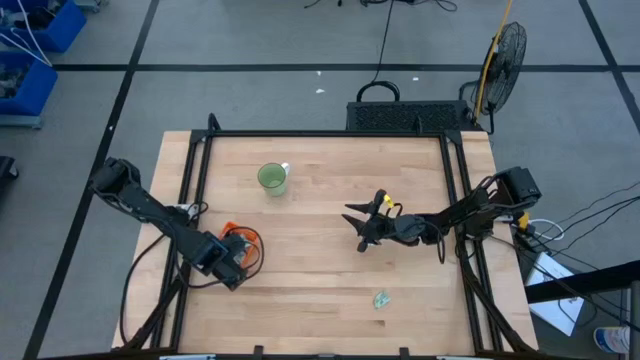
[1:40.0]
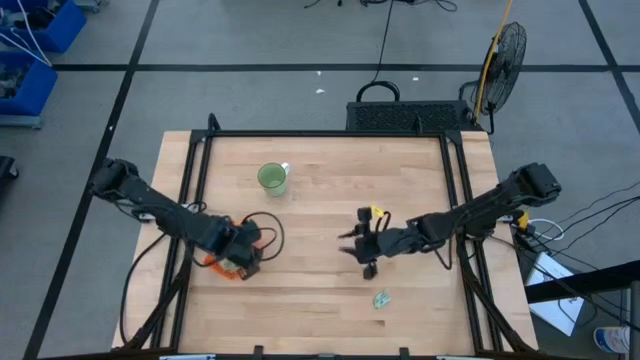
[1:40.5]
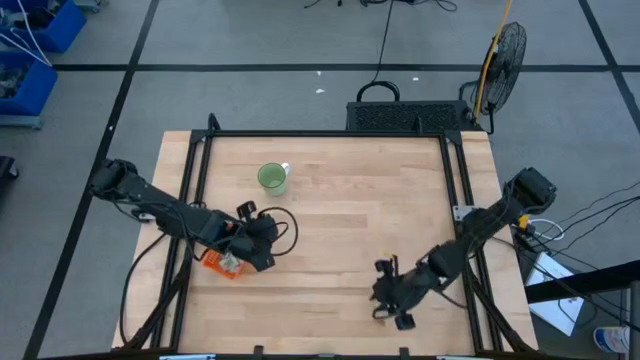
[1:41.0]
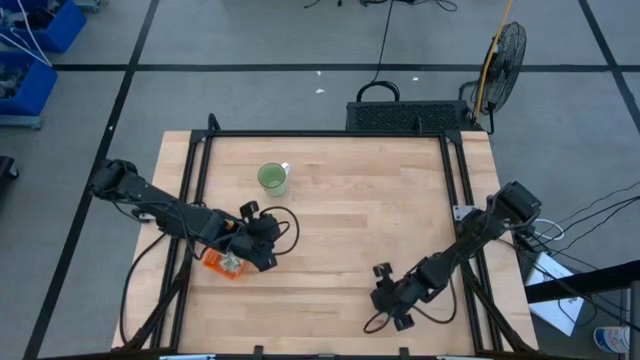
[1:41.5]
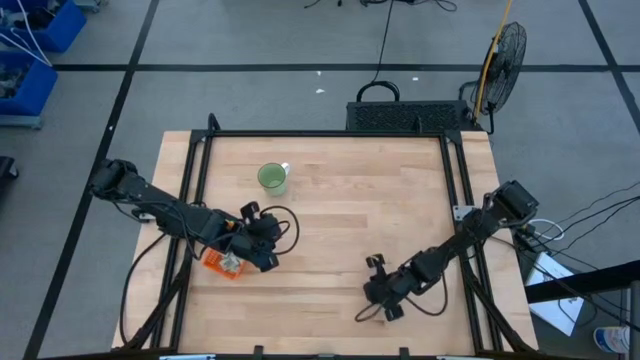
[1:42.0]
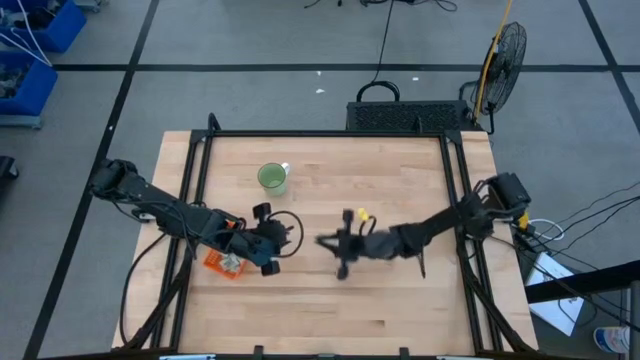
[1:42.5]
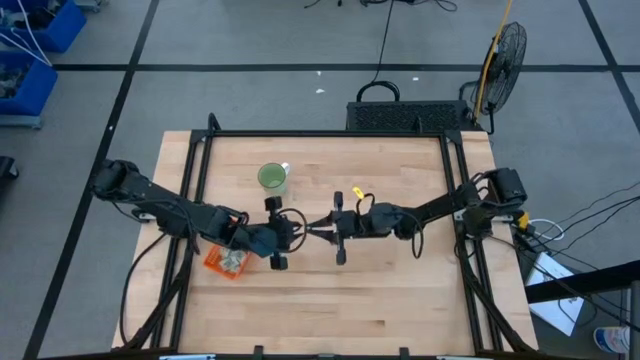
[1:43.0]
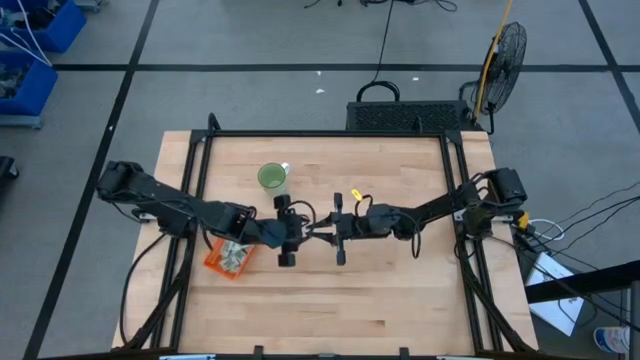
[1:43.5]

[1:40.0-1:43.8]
Task: Pick and place Stevia / Truvia into bins
Put the stevia packet into the orange bin

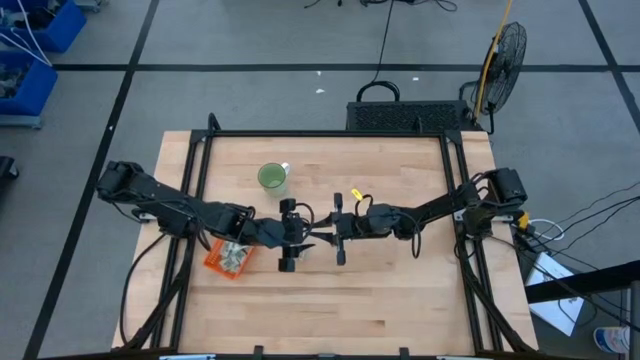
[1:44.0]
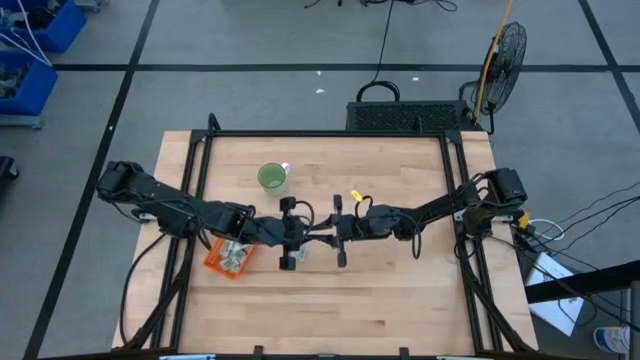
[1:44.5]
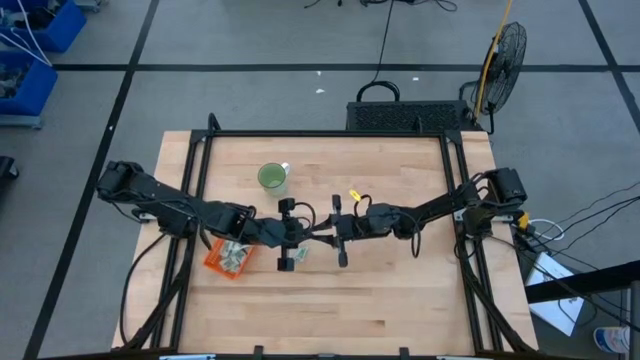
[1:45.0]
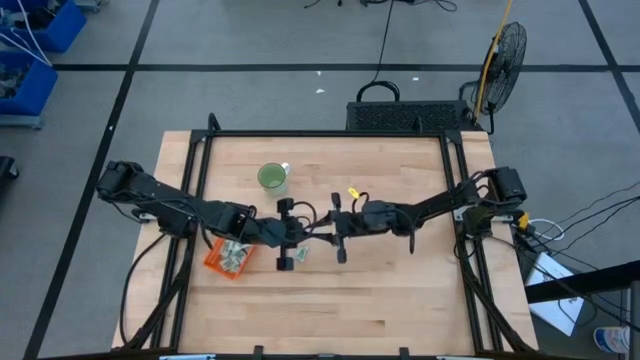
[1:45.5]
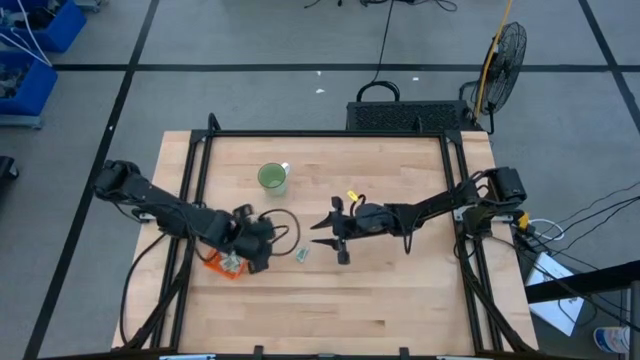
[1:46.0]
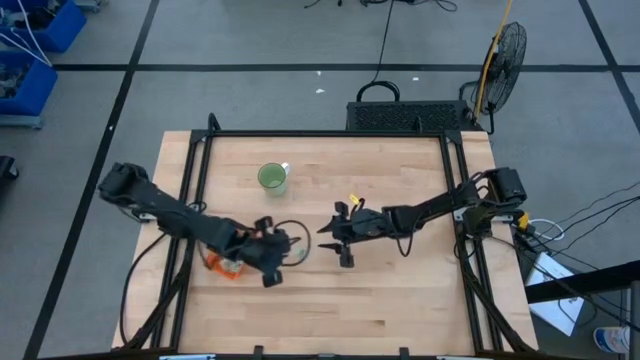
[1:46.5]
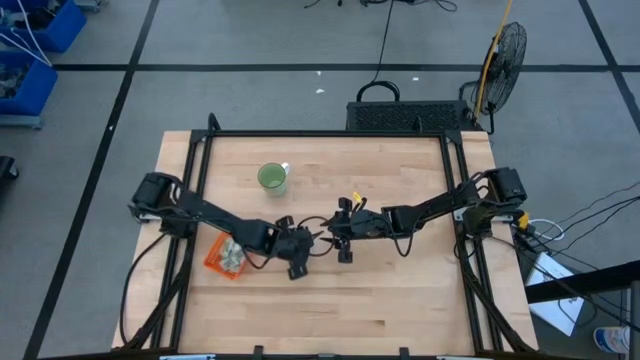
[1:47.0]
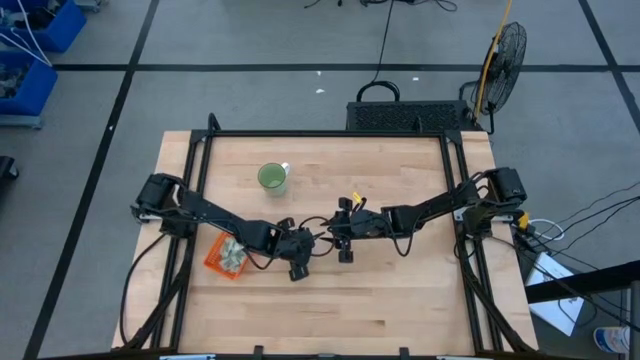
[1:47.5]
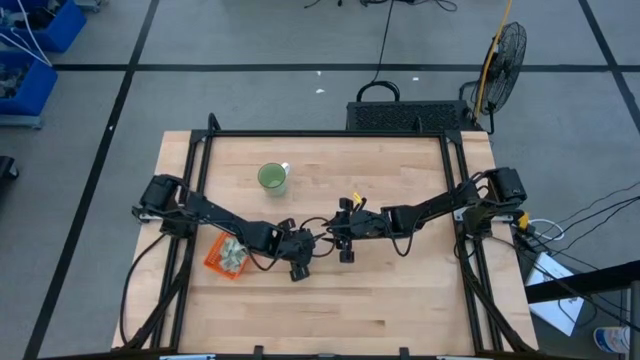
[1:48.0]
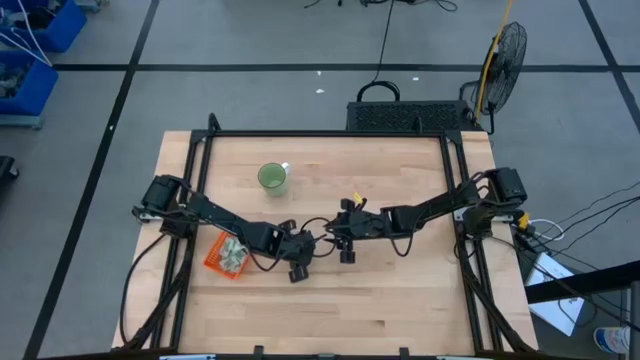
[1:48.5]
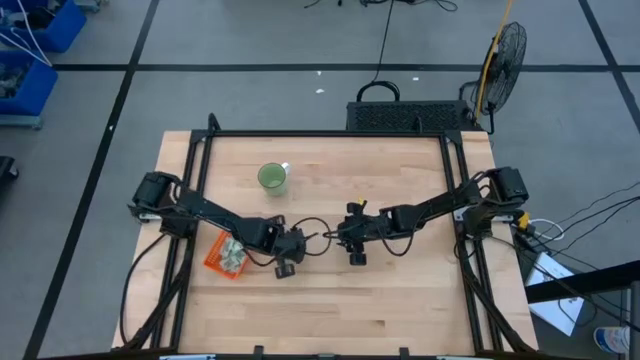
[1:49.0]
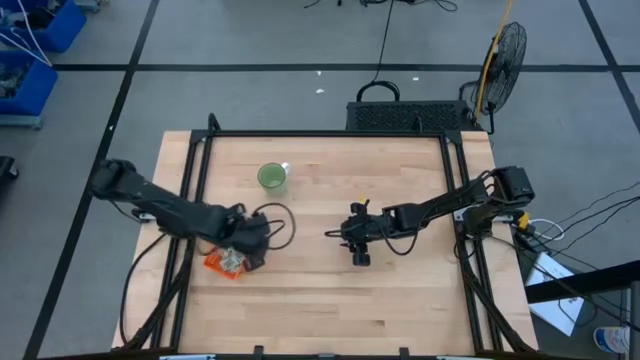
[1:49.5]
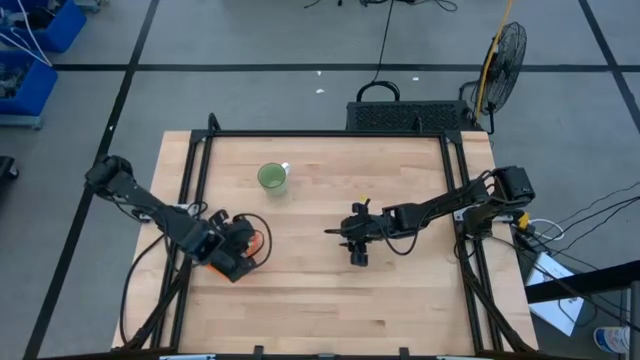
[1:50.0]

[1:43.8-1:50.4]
Put the stevia packet into the orange bin

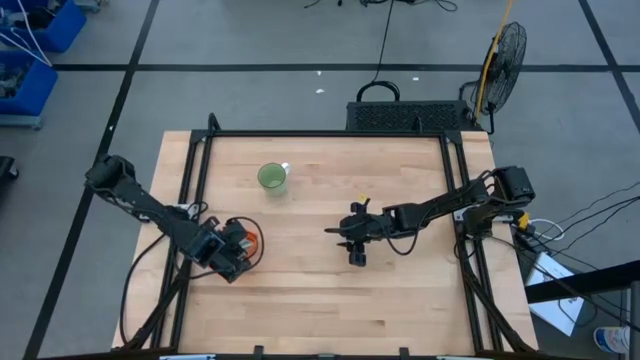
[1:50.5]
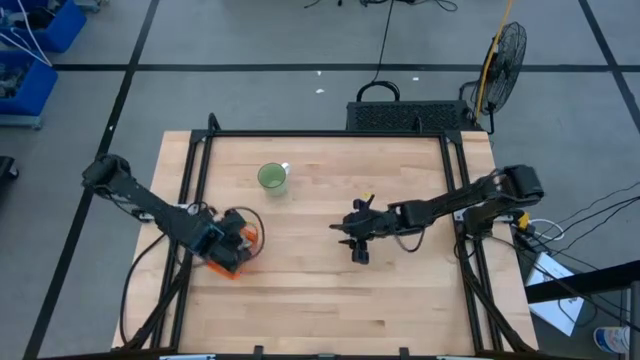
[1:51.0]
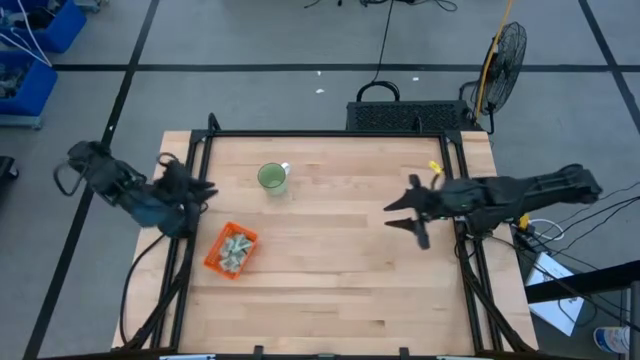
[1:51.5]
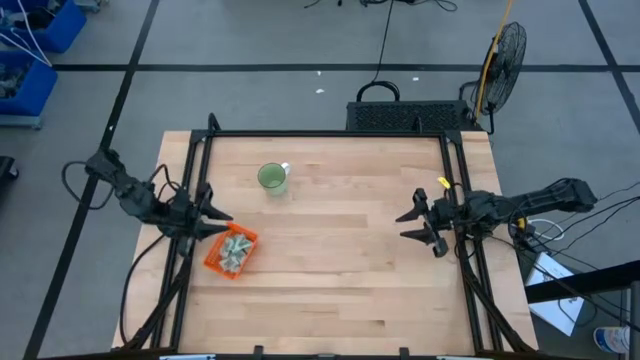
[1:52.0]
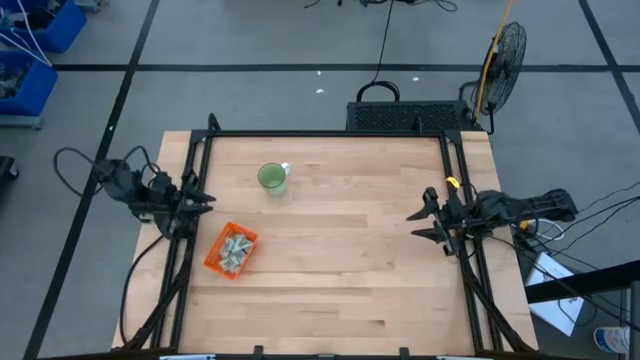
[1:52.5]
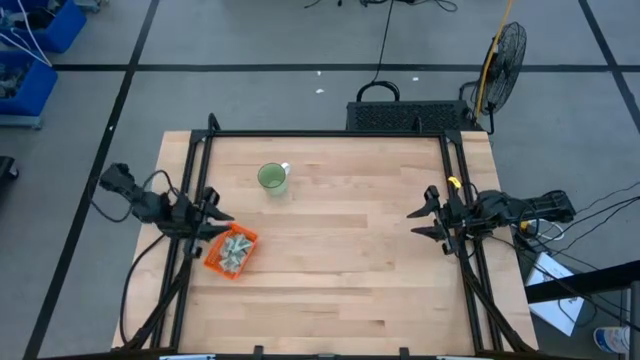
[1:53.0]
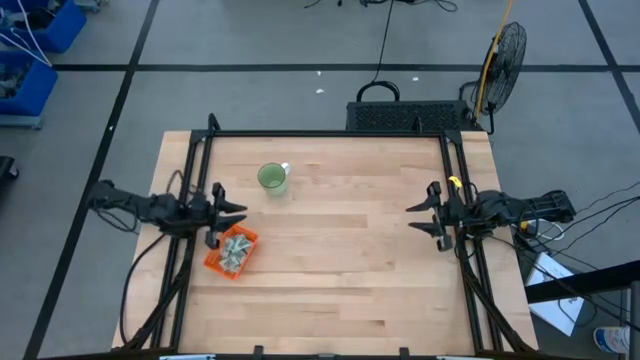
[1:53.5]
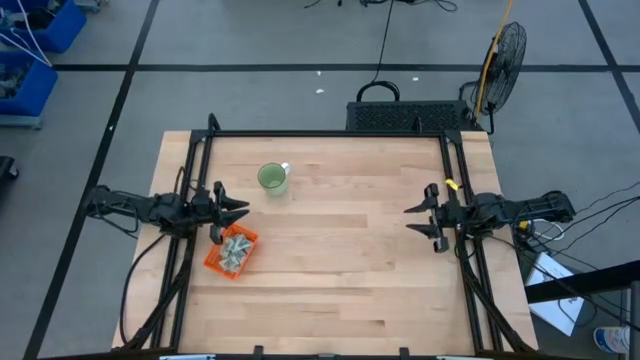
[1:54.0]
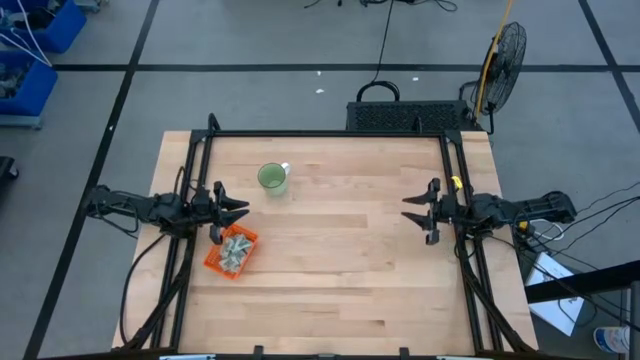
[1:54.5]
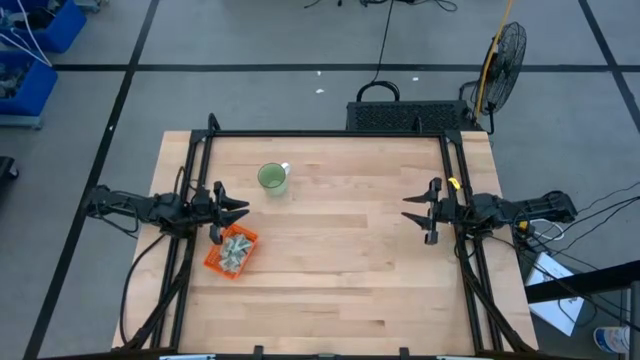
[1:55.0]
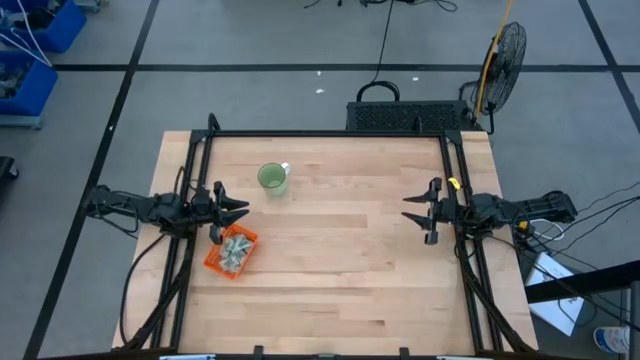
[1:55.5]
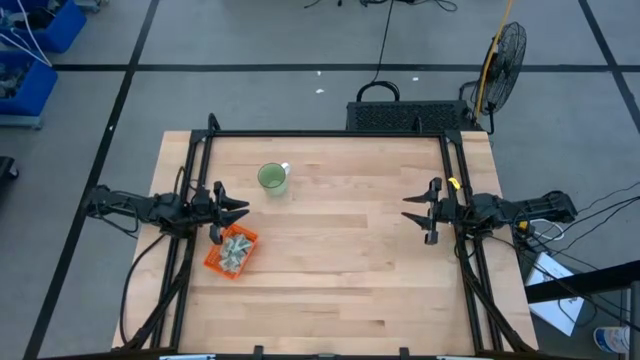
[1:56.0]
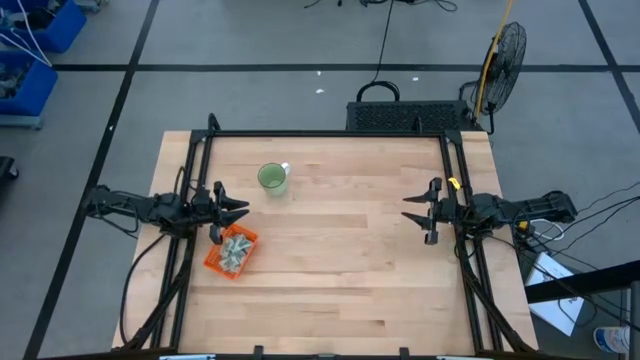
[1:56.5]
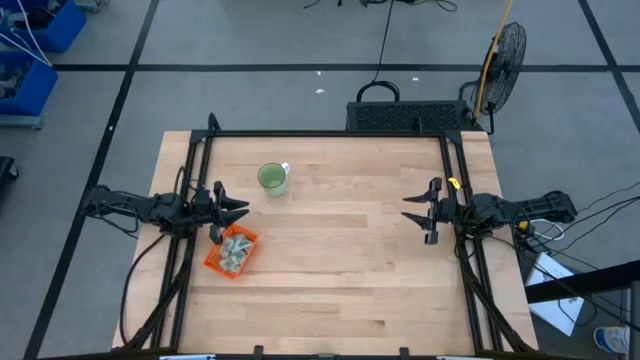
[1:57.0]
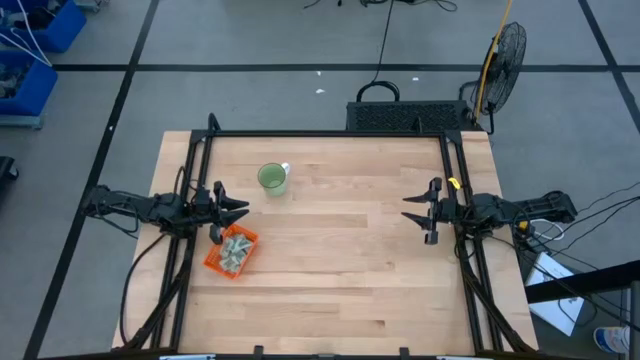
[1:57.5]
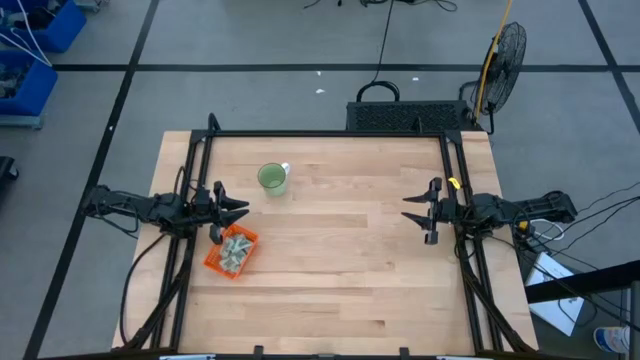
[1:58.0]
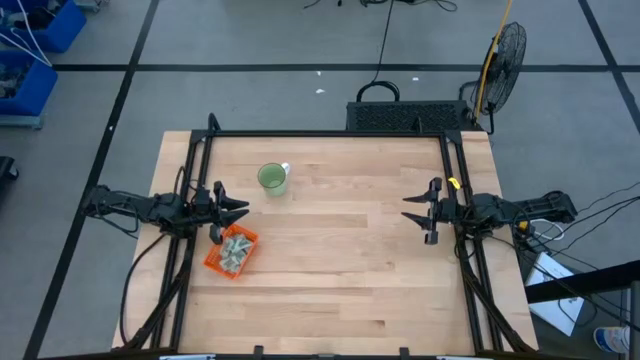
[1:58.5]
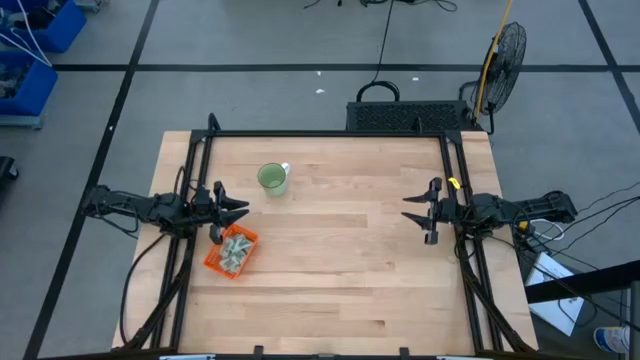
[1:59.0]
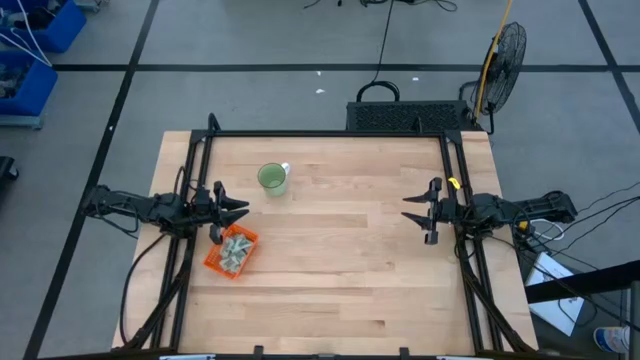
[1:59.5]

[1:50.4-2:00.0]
Return to Home Position

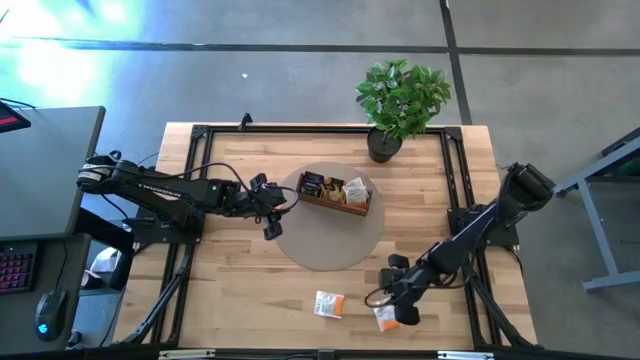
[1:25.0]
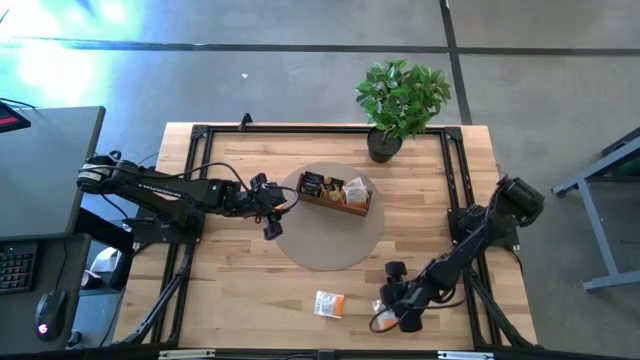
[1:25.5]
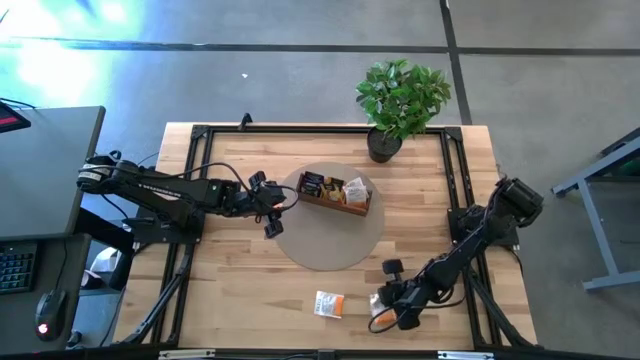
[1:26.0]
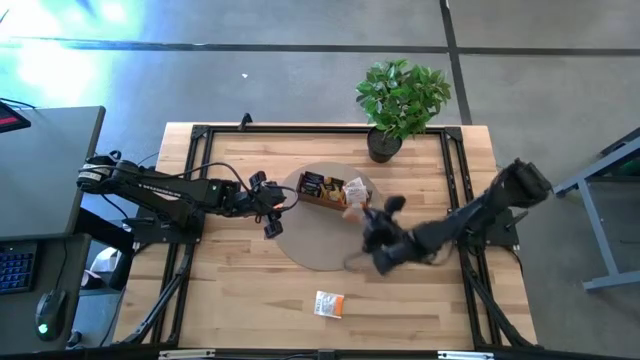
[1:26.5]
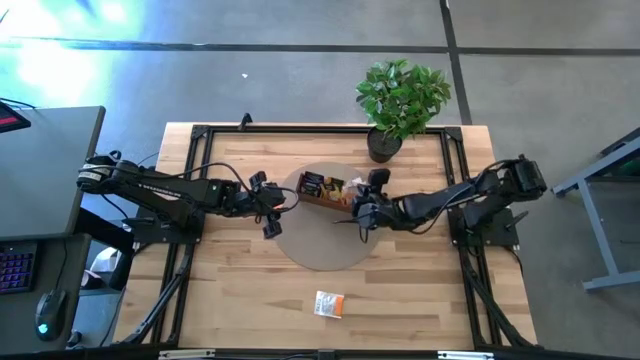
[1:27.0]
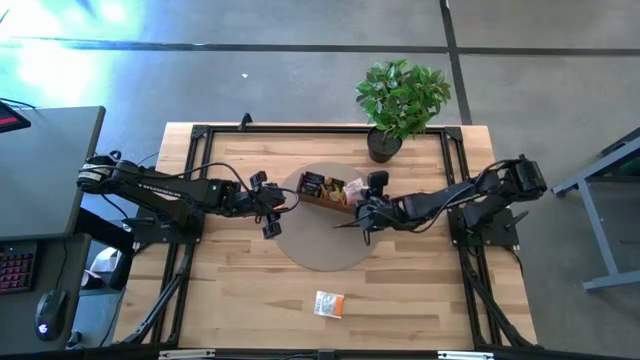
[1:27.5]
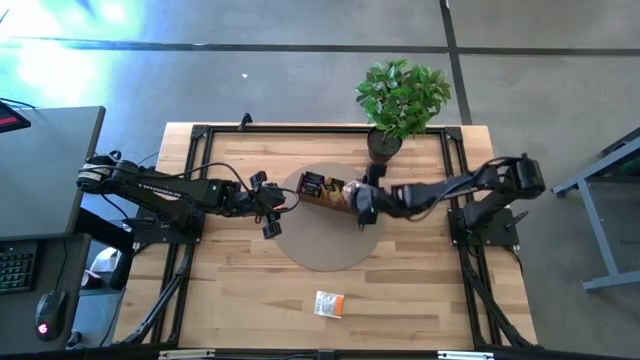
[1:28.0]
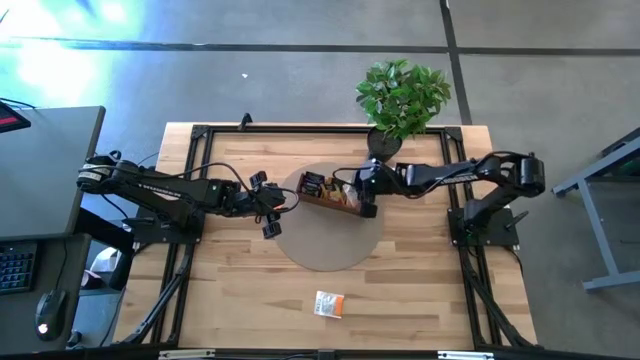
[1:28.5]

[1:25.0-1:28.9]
Task: Pick & Place Tea
Put the white tea bag into the right side area of the wooden organizer
